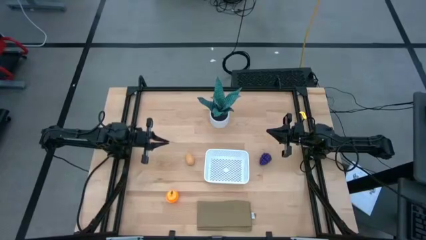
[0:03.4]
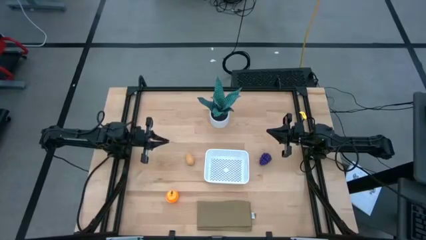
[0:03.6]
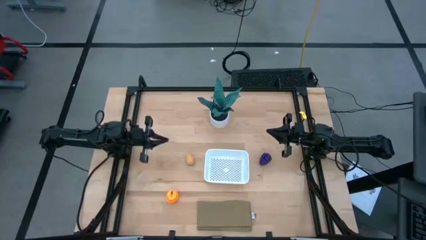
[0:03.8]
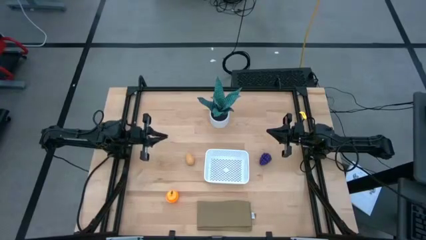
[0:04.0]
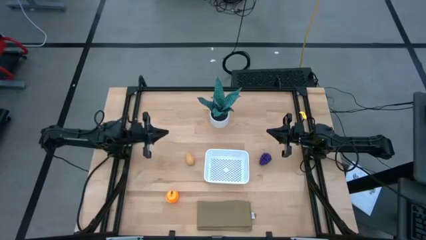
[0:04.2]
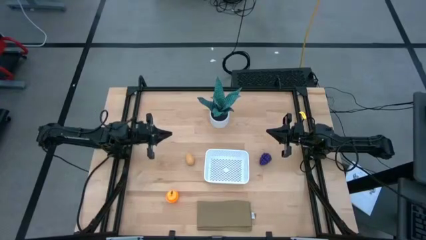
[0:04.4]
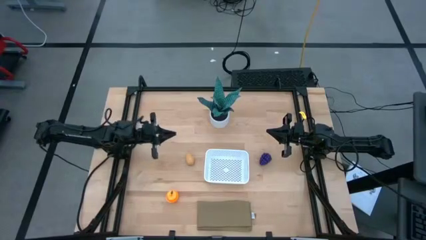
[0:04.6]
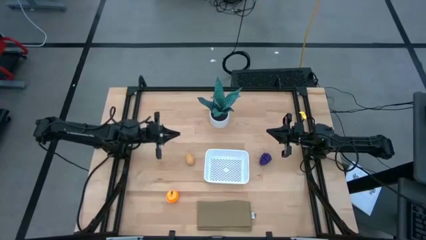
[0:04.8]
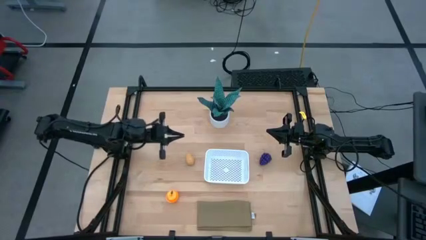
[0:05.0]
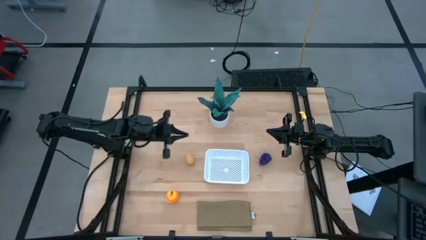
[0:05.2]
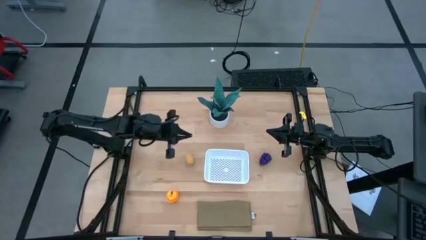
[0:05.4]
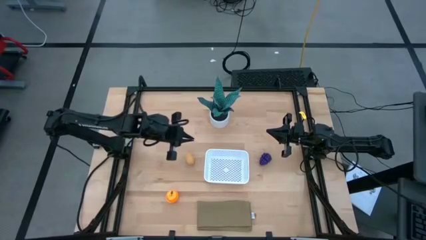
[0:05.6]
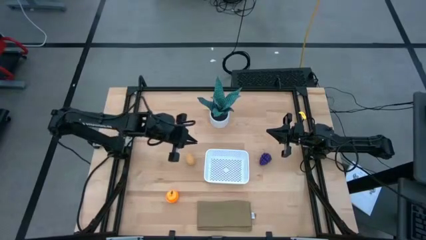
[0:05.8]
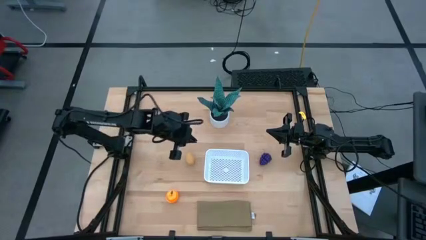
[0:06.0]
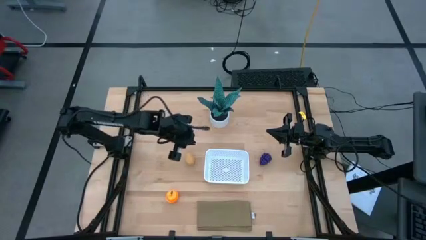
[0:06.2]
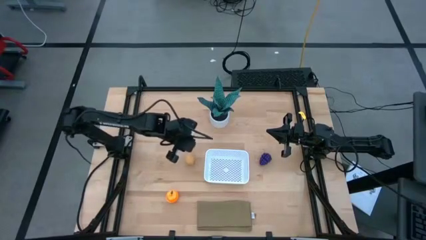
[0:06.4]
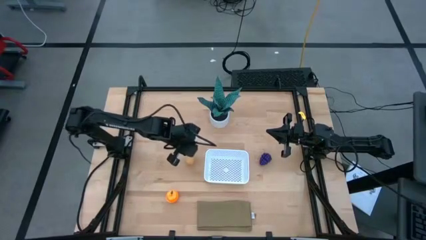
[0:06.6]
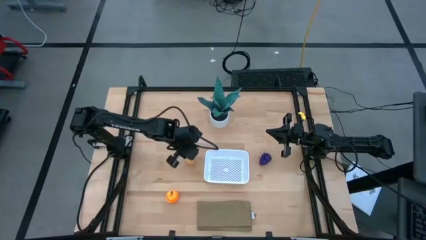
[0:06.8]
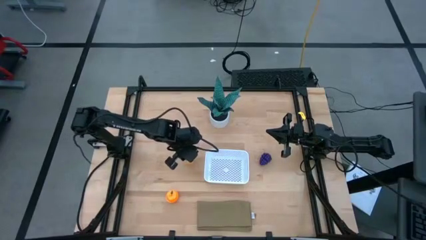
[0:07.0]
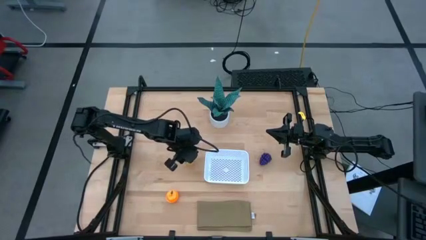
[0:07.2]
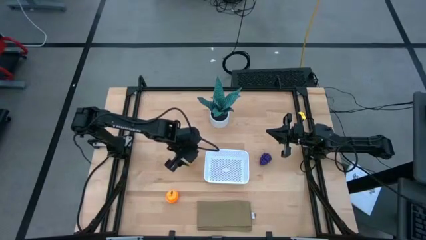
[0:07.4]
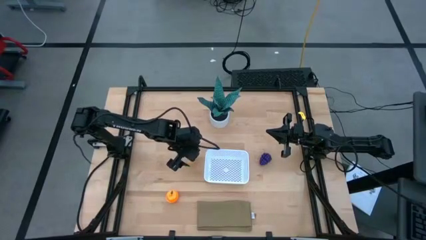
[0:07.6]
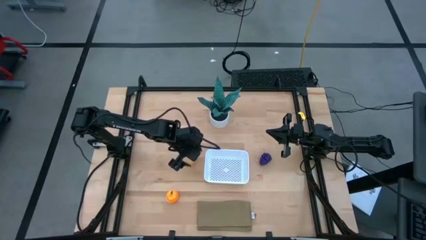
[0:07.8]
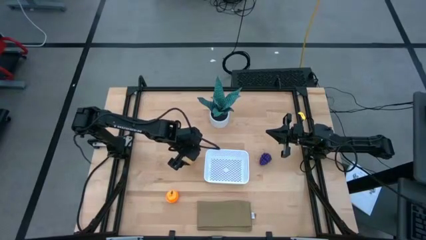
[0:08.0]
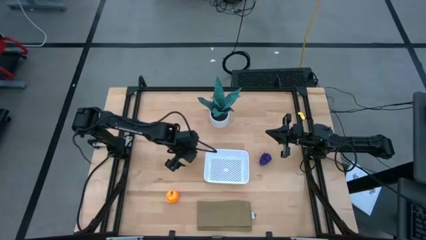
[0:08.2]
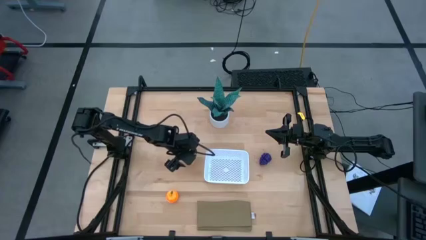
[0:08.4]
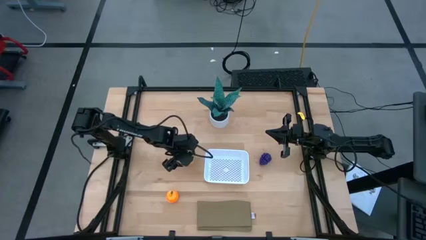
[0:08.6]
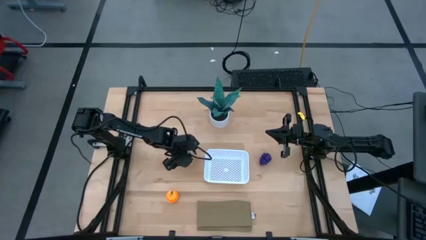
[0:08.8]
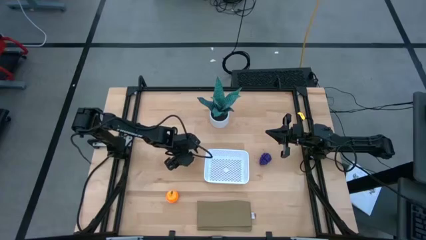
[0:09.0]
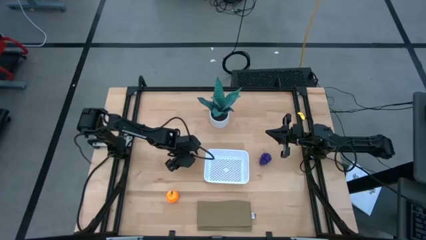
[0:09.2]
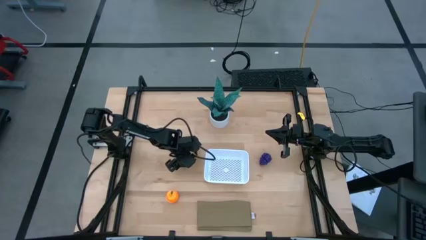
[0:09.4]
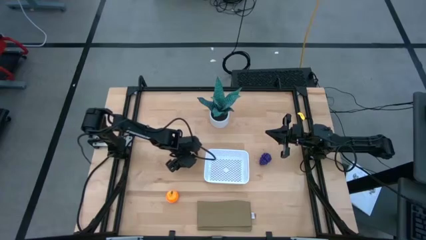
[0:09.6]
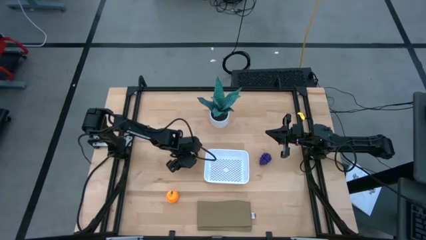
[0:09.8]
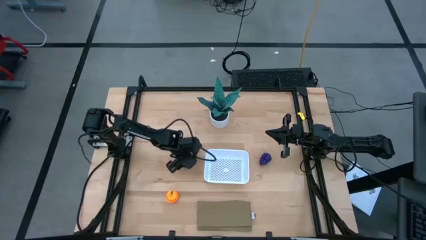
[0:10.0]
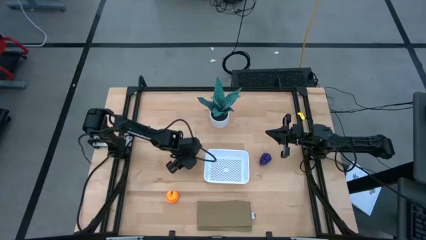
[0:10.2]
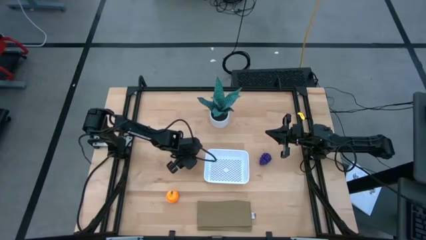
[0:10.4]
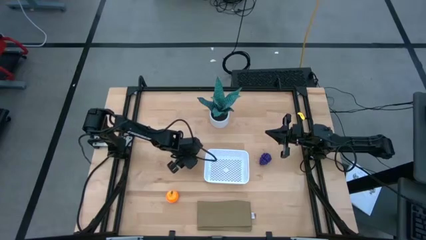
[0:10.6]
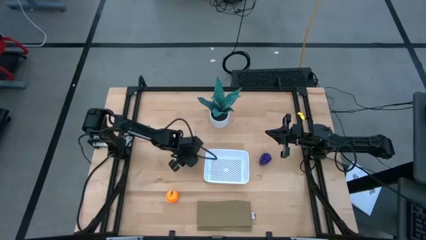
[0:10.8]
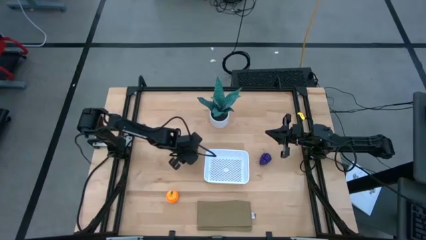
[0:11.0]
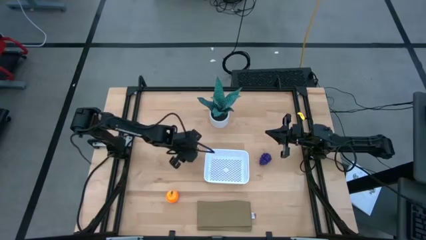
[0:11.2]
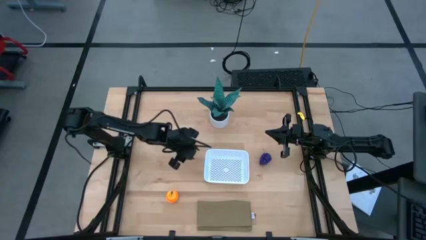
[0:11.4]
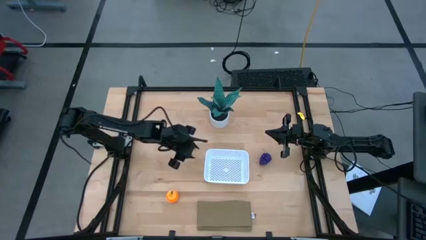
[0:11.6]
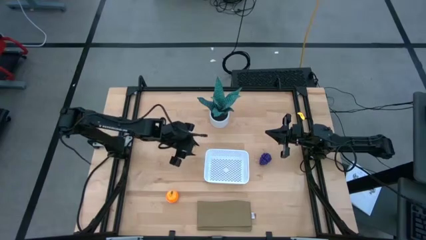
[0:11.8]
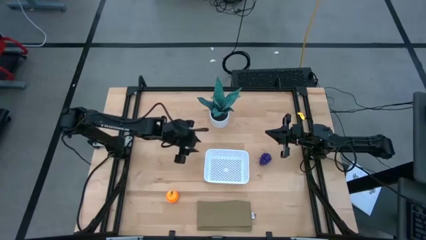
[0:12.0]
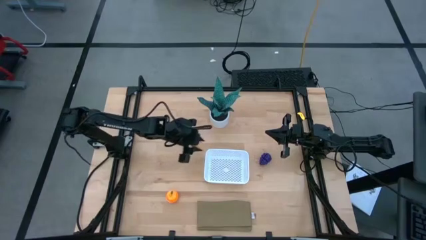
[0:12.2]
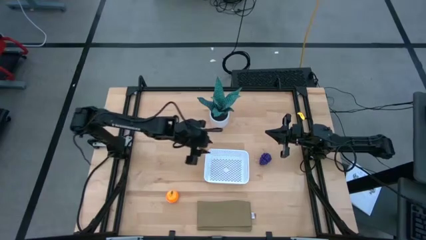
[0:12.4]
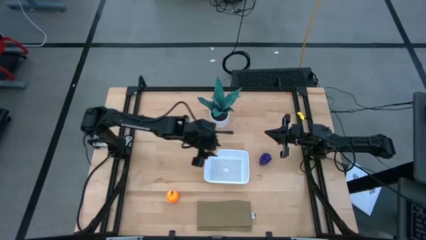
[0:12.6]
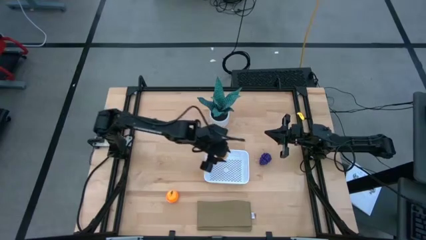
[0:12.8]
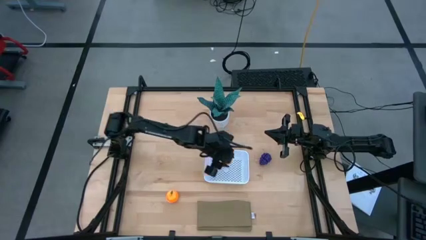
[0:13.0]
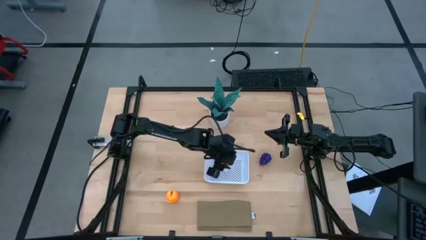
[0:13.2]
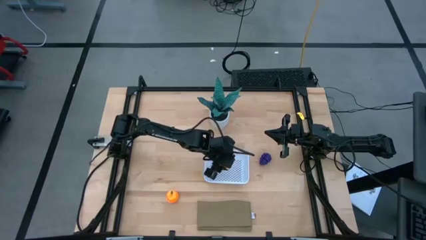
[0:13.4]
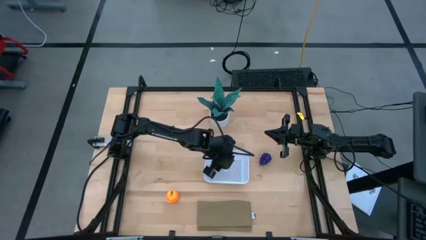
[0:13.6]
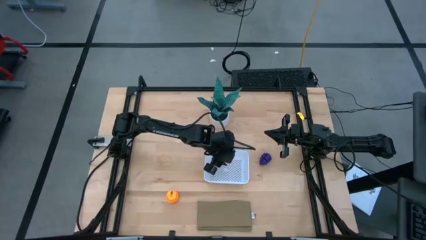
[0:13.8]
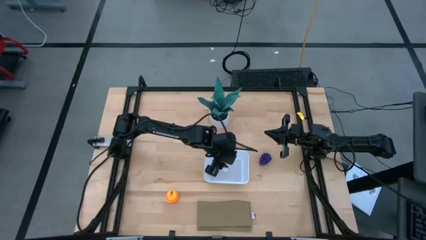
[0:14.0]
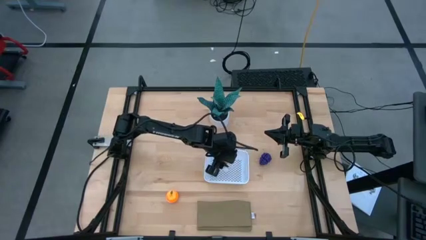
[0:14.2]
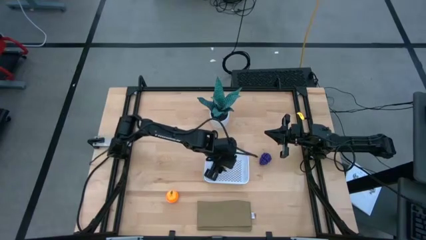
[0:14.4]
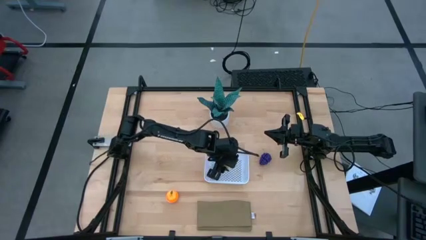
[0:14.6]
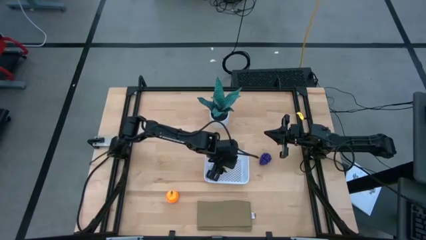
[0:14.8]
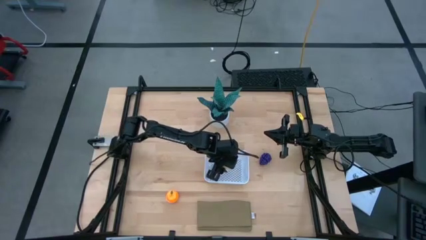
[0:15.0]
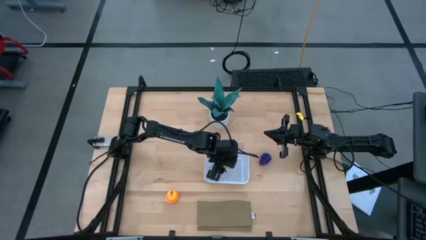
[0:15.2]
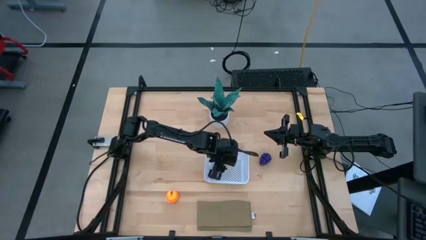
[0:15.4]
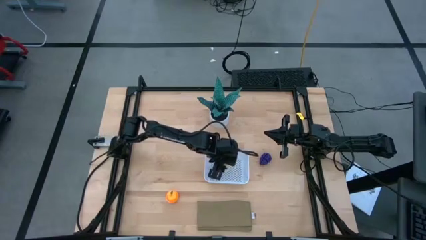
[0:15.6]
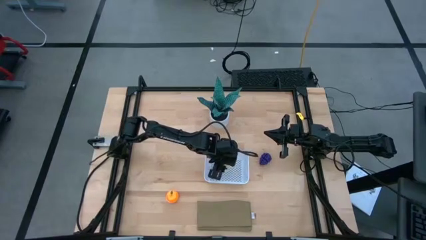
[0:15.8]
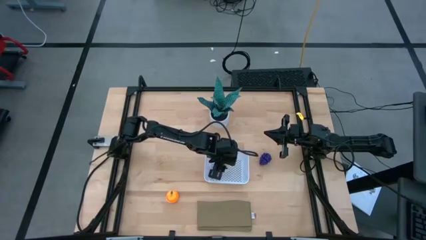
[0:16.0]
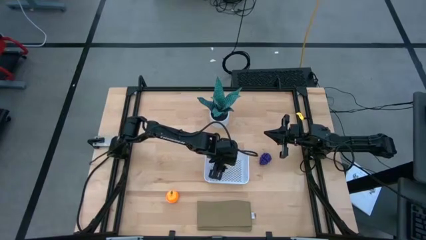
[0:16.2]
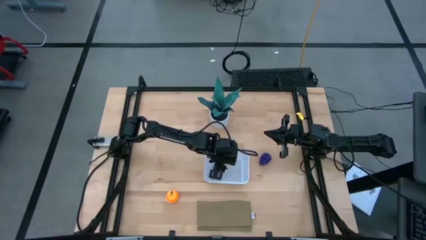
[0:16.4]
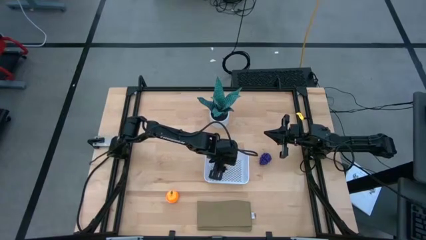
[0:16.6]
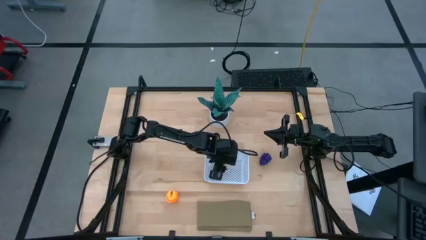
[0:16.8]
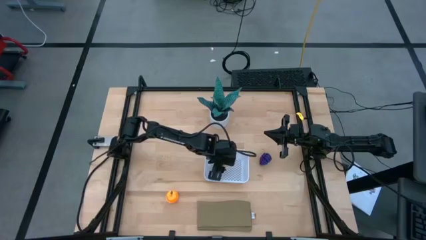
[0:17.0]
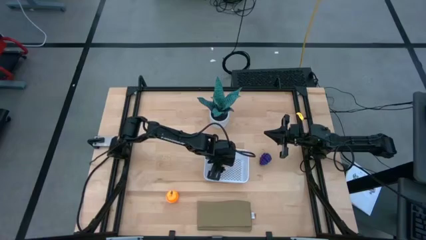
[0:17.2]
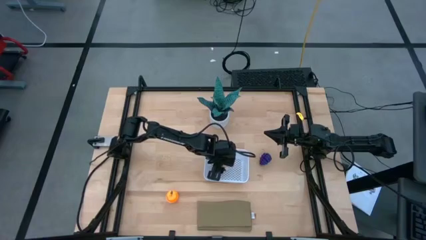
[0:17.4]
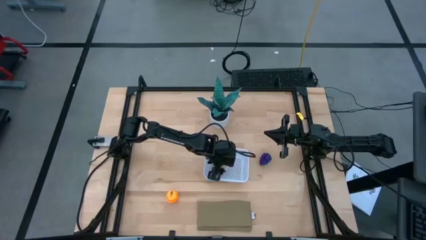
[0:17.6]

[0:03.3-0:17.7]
Task: Pick and placing Produce into tupperware
Put the potato in the white bin

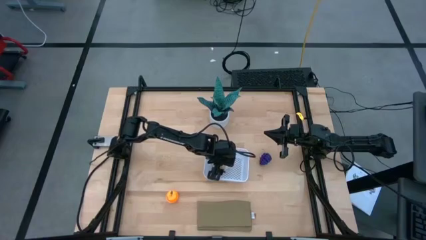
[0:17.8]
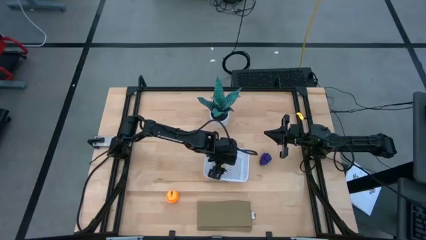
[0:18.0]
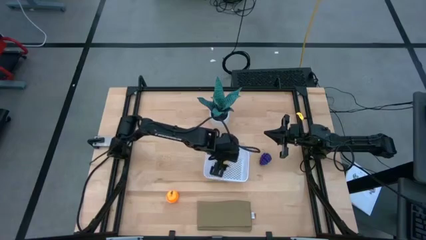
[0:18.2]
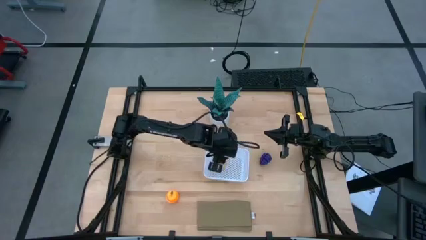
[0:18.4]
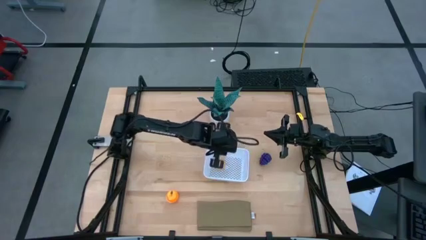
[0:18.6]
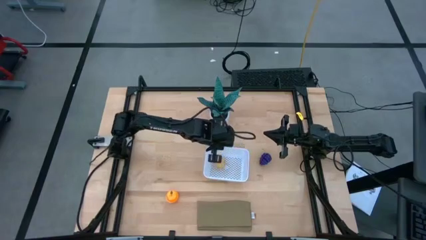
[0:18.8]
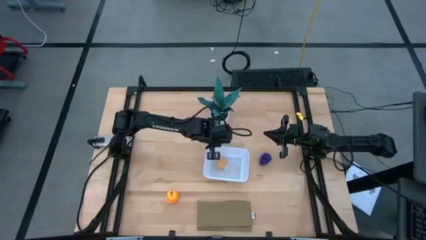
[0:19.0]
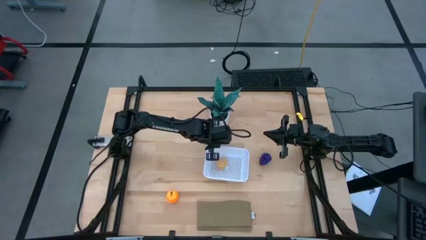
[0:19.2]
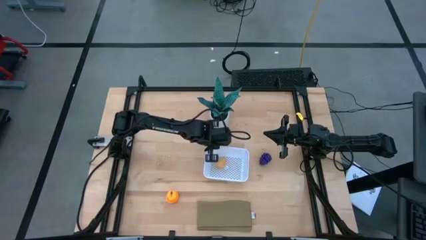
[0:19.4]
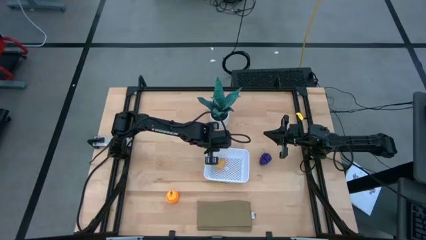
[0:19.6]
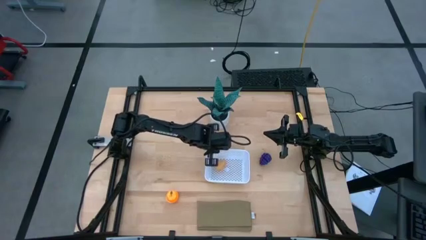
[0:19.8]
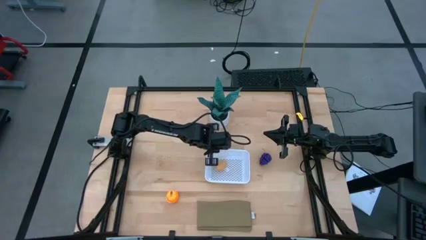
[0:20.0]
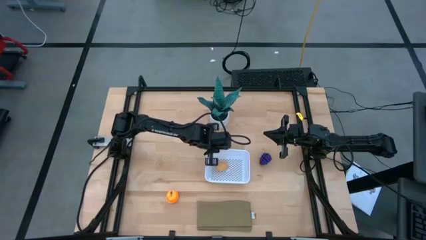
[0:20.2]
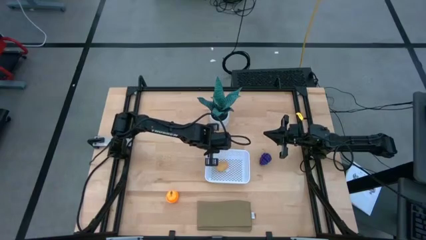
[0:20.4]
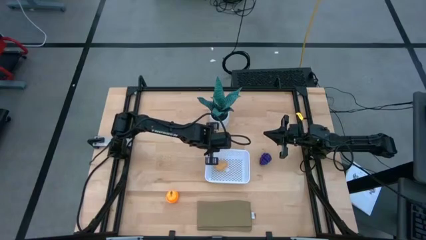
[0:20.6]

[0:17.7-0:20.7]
Adjust the white bin
